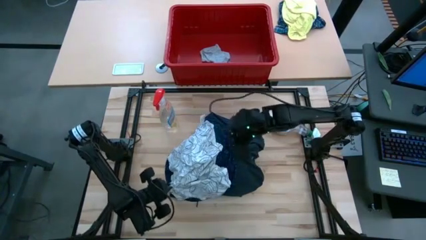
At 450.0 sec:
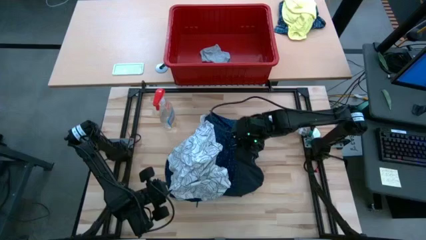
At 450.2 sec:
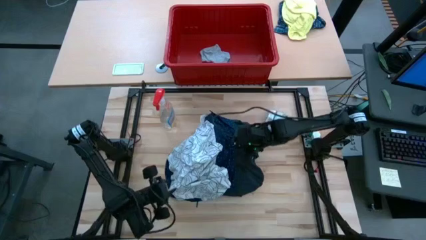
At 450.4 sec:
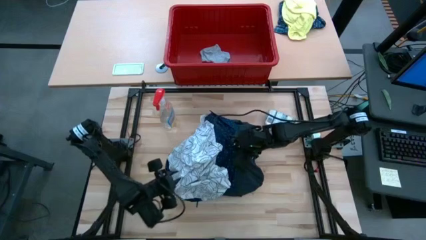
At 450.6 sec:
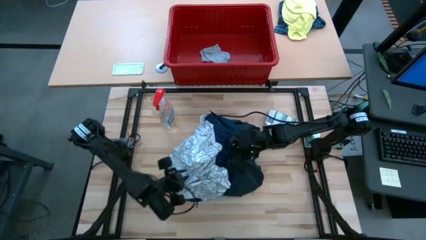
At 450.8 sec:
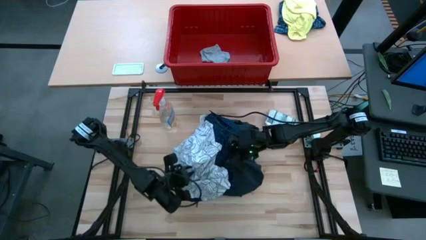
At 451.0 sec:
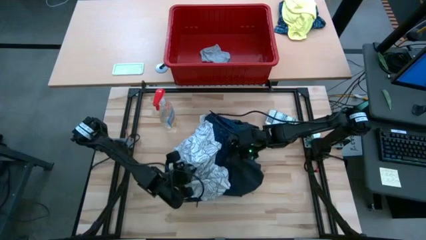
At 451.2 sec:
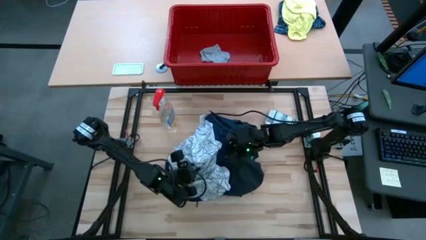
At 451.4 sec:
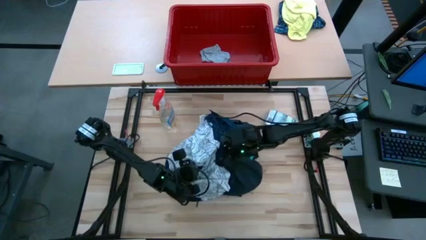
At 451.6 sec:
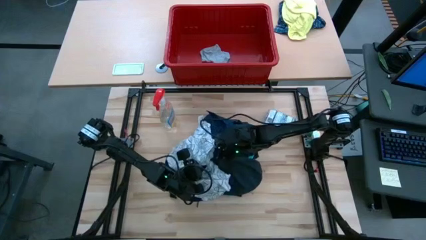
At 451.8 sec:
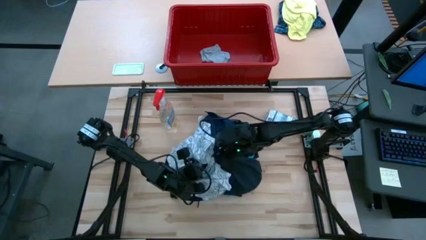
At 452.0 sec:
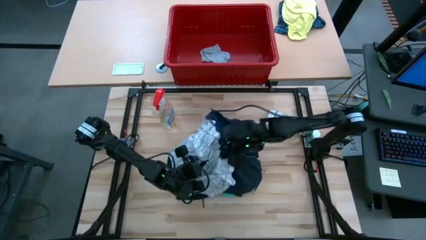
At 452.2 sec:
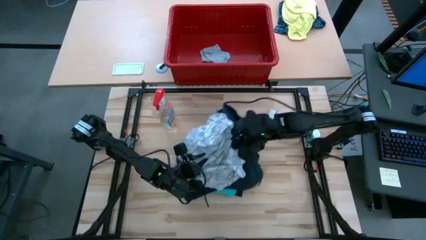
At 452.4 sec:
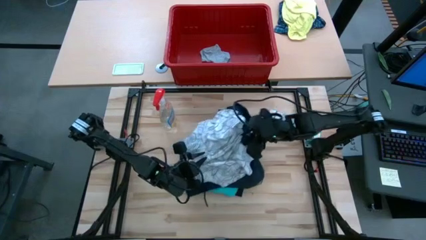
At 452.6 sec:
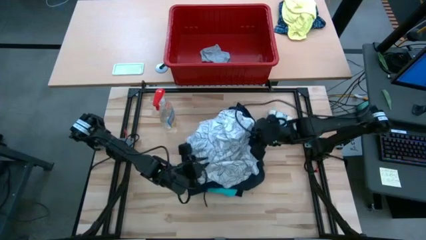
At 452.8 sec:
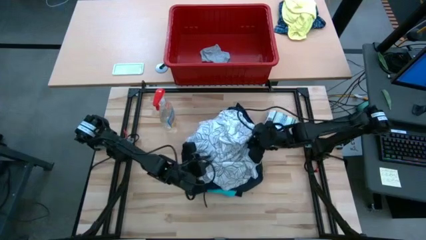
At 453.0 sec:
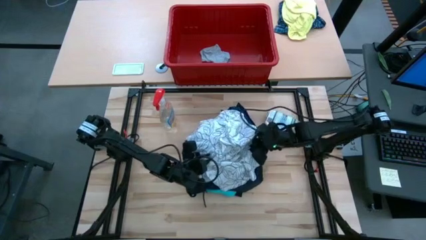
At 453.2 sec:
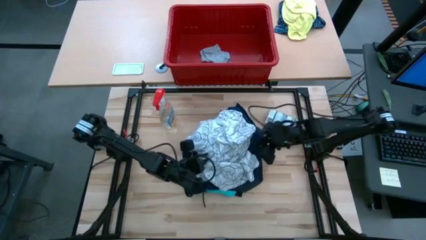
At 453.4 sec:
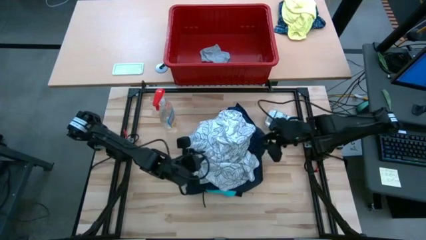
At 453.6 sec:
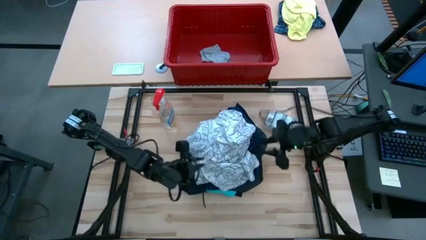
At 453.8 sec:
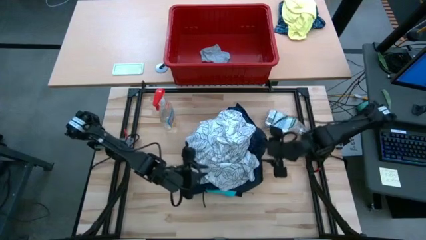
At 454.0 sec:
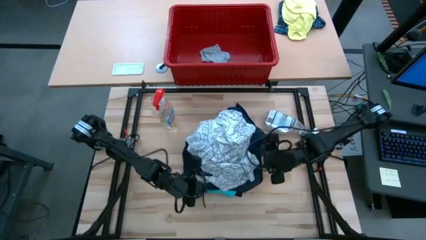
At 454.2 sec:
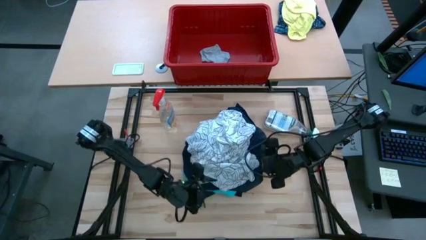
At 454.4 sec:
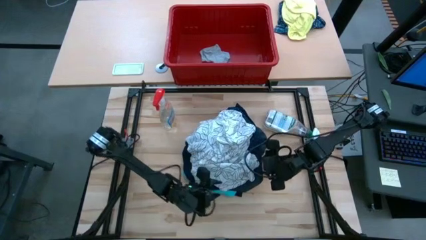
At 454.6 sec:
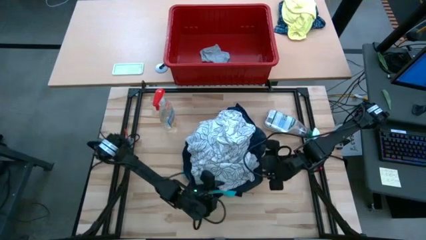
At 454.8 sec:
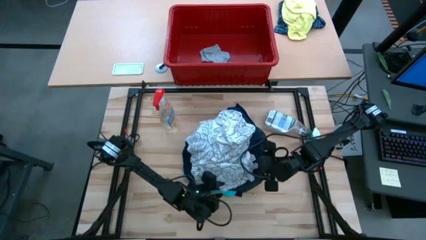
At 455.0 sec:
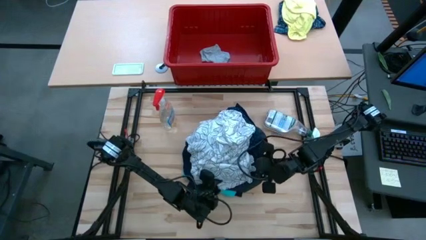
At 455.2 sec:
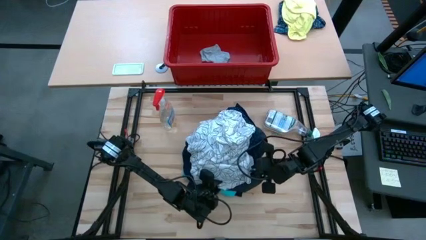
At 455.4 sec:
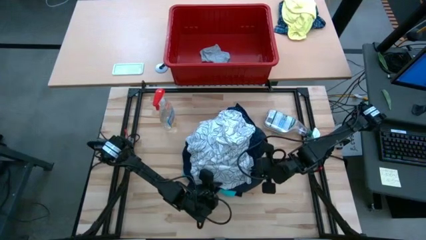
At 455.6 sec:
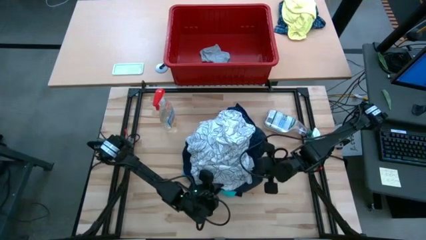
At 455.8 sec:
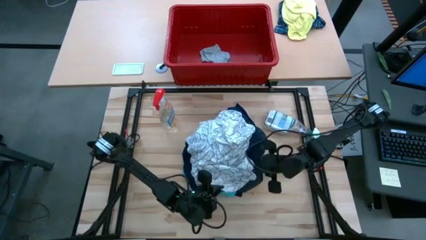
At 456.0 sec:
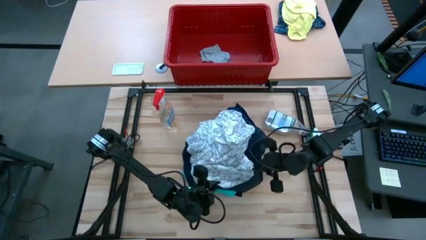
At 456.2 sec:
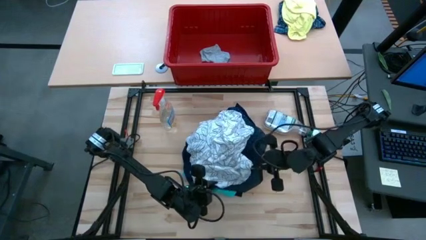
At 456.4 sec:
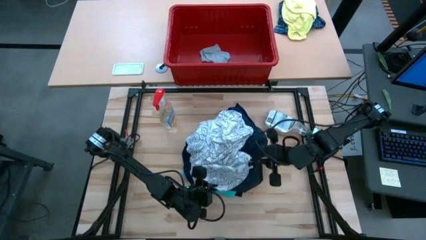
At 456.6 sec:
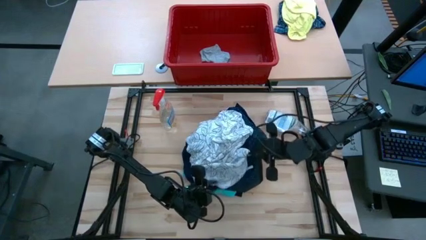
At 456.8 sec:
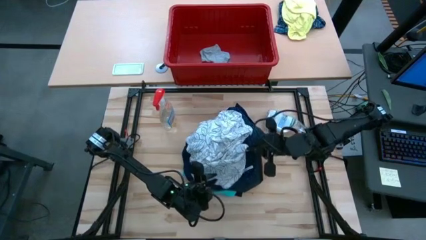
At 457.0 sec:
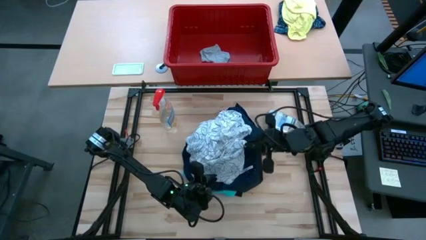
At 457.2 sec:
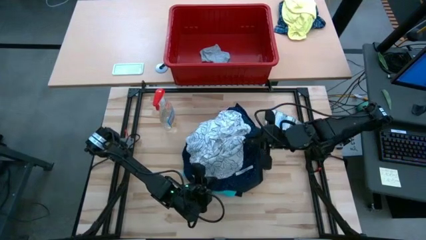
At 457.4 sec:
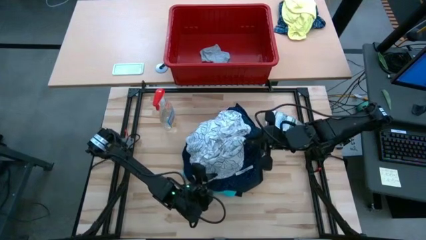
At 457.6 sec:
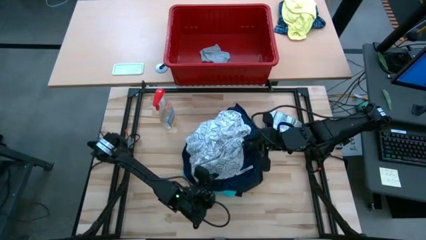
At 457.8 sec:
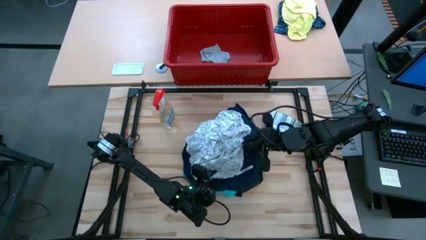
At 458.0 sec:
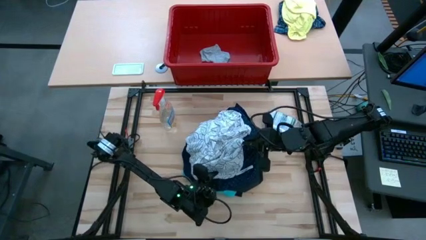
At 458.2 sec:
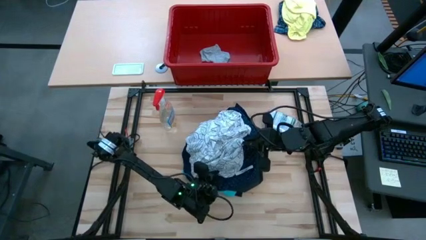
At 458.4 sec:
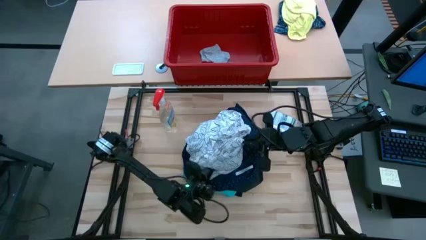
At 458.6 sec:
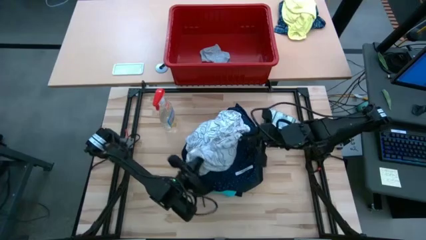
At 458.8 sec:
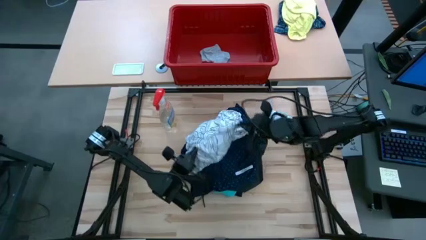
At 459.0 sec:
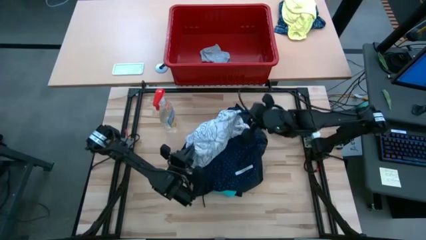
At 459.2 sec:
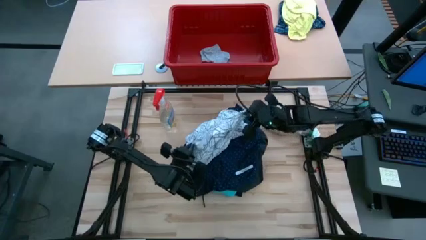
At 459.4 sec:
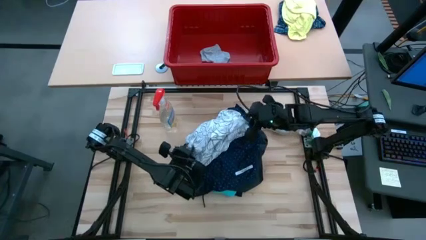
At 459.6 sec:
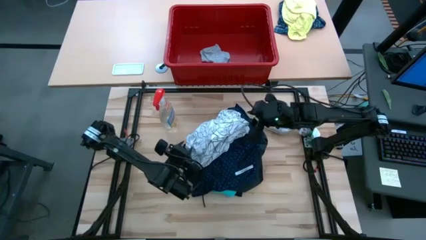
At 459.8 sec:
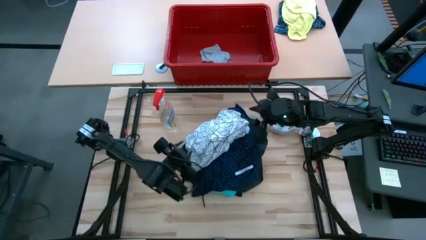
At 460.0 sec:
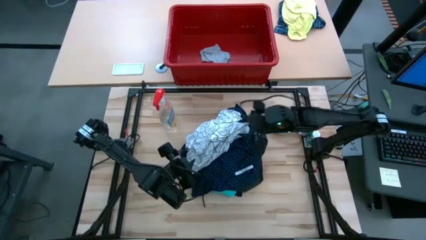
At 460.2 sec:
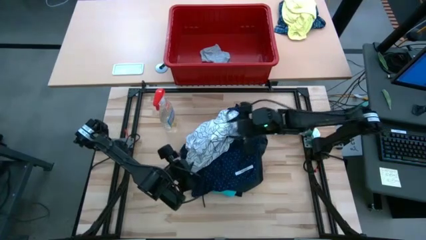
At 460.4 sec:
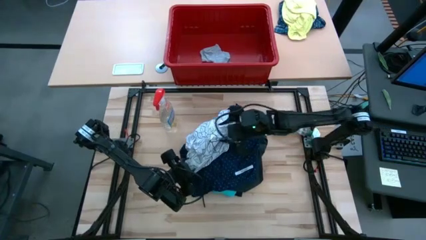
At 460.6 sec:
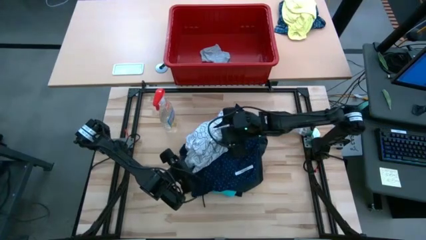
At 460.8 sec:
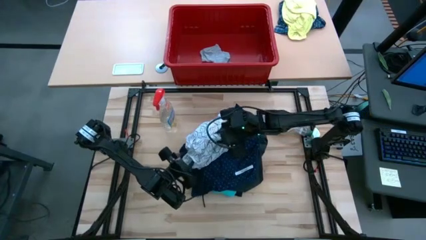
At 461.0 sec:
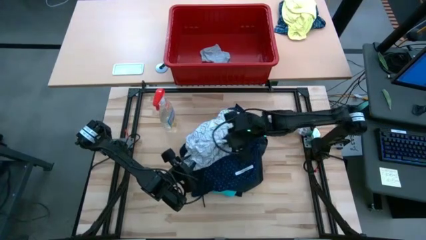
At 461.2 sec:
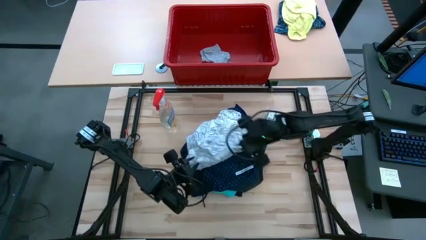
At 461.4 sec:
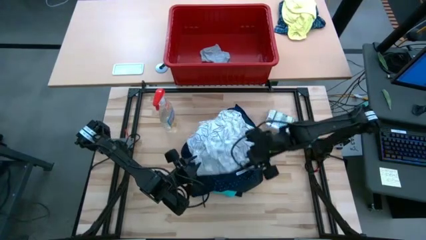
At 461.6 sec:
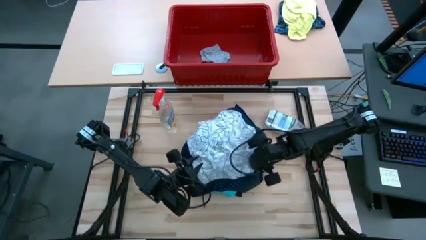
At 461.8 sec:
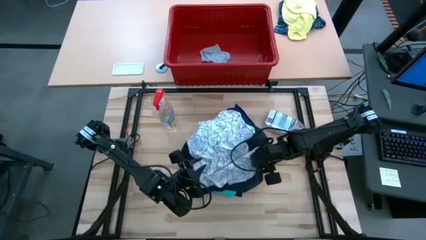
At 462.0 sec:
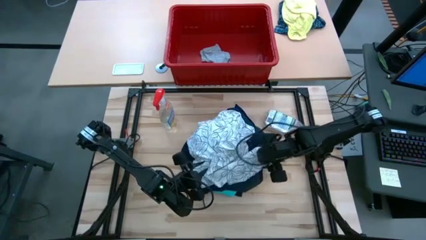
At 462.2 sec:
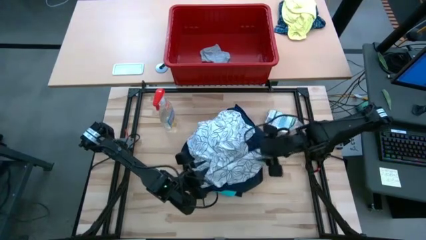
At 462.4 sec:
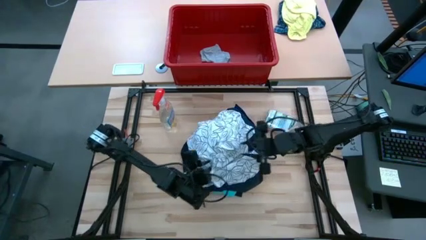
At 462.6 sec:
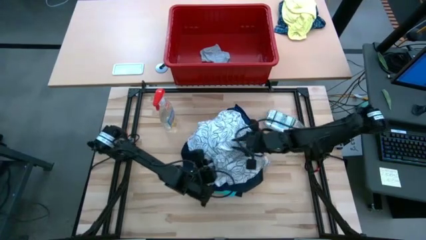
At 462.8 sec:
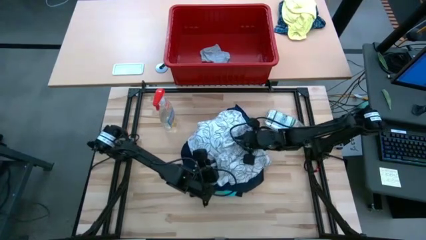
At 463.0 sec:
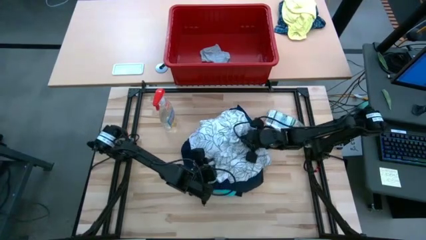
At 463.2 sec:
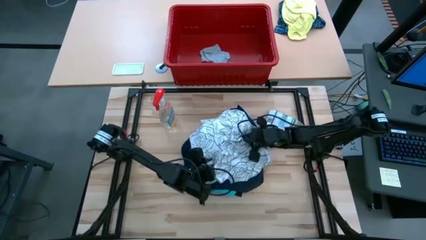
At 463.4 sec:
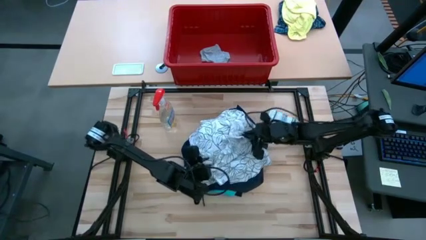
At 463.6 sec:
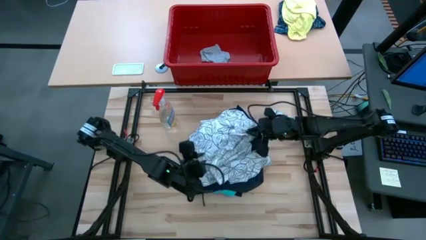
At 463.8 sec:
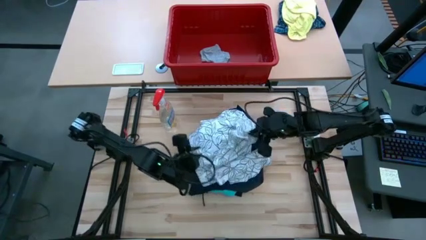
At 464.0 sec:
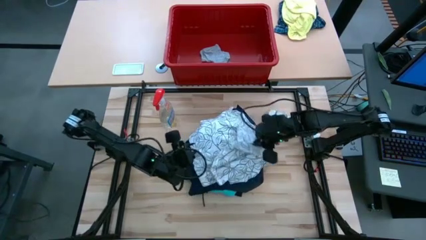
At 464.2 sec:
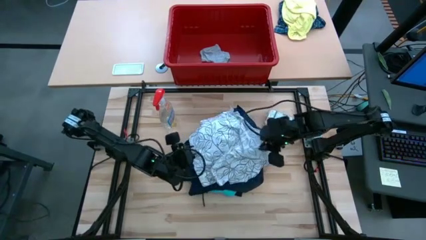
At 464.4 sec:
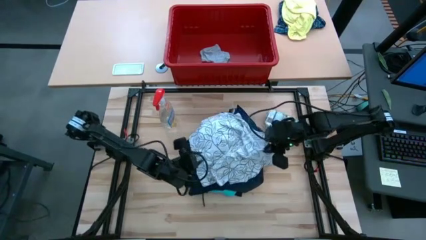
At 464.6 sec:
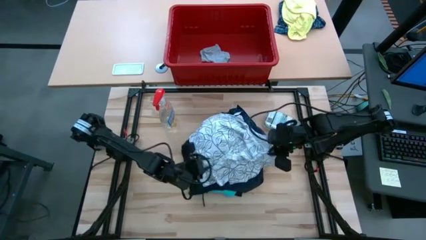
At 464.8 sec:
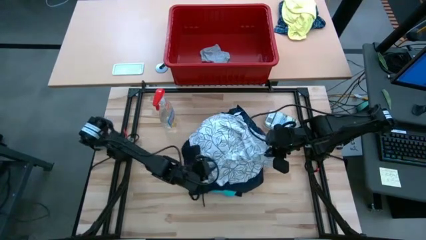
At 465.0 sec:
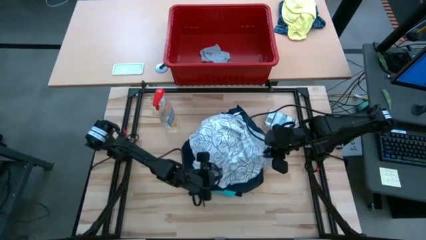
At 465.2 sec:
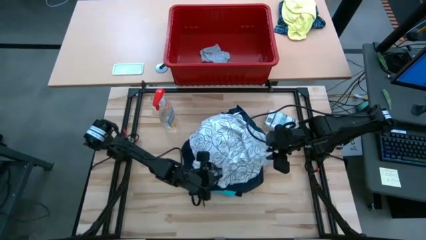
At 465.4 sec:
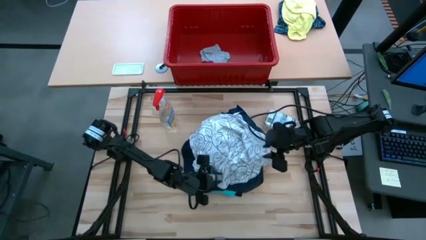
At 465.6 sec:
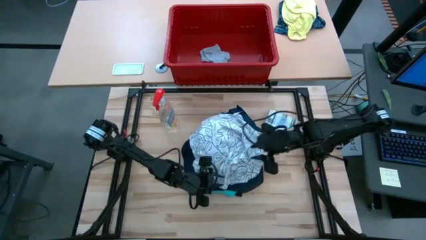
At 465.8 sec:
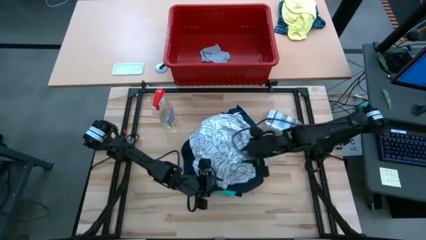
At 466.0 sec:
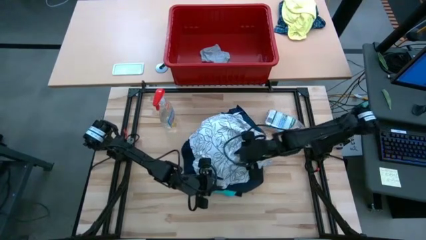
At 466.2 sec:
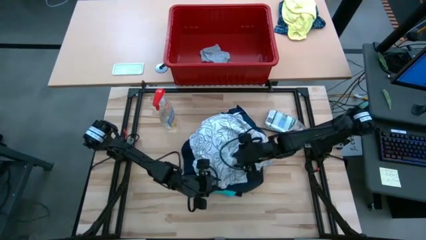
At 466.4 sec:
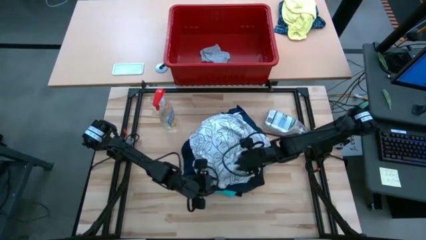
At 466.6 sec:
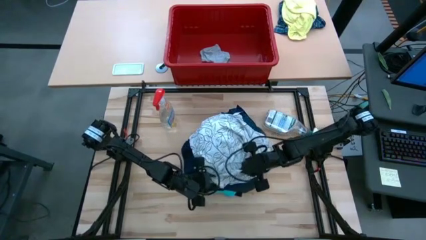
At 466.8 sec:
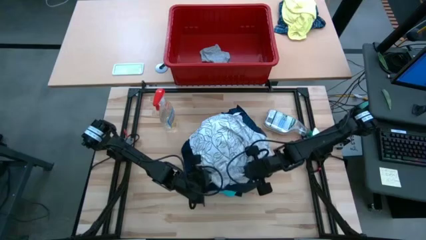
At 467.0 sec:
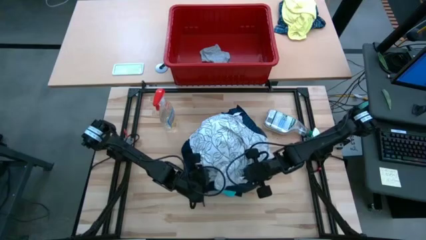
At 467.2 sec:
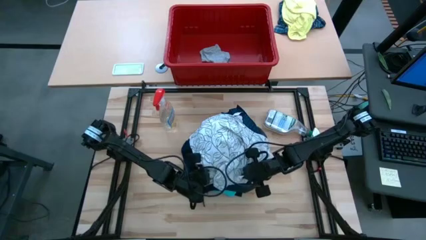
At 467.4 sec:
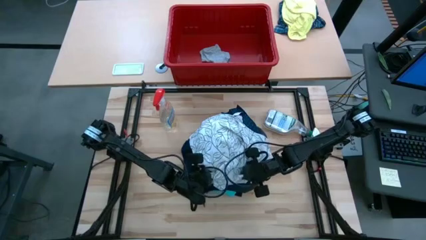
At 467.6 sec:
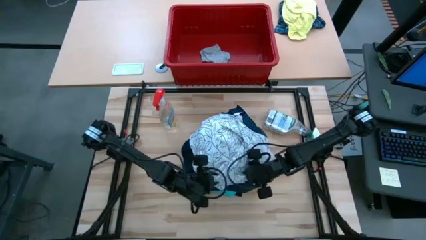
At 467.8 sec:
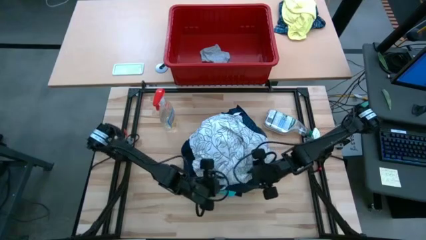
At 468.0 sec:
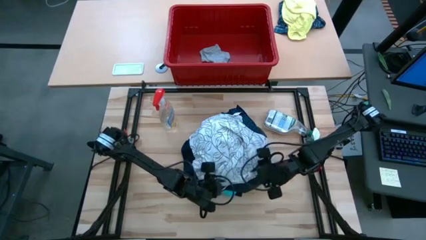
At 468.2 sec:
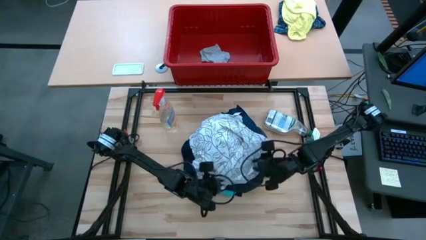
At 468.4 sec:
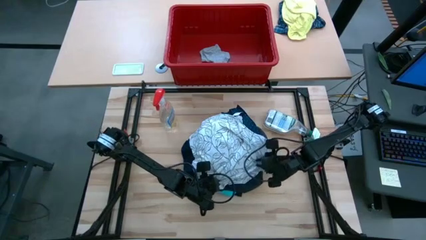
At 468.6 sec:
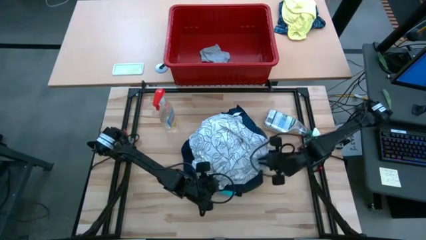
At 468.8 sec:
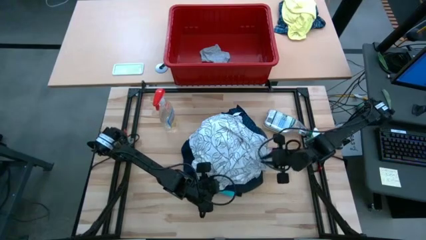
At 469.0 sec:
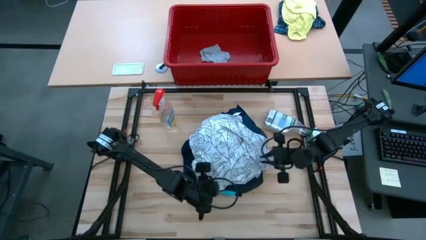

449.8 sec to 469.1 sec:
Task: Fold Laundry from Bin
Fold the white floral shirt
